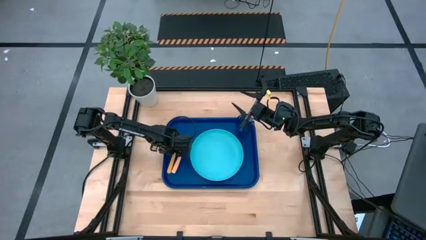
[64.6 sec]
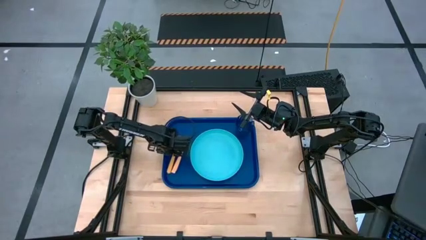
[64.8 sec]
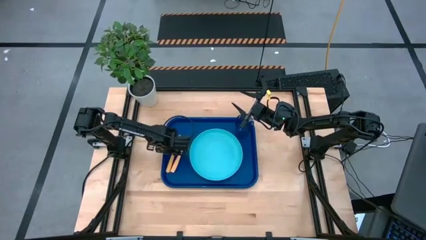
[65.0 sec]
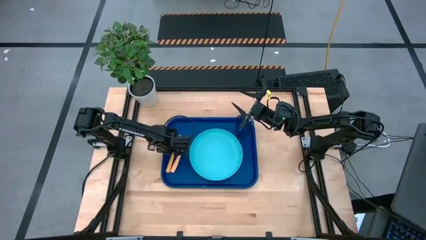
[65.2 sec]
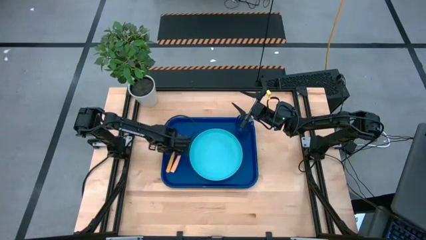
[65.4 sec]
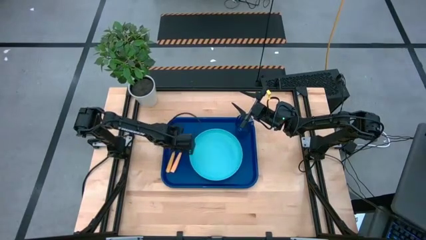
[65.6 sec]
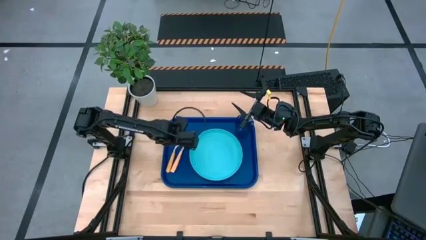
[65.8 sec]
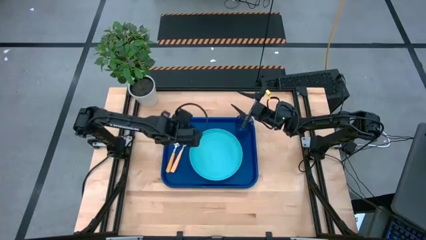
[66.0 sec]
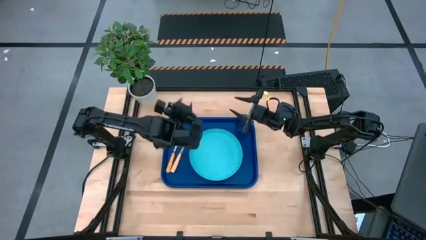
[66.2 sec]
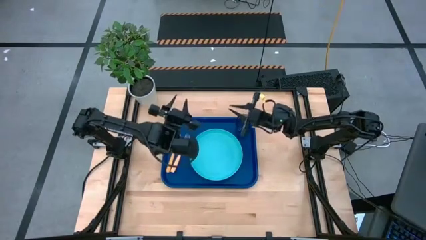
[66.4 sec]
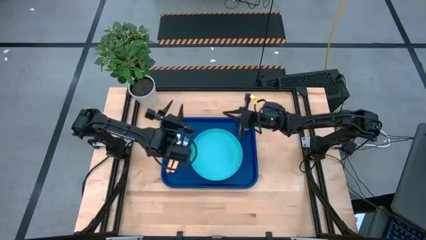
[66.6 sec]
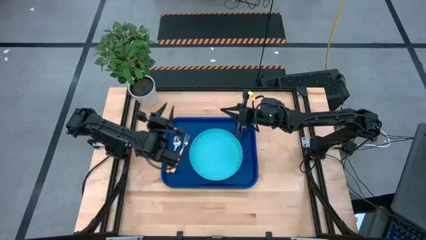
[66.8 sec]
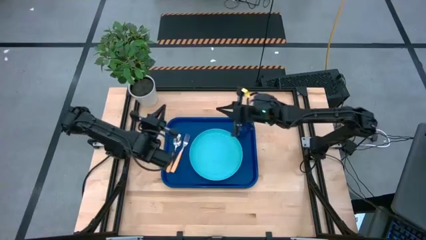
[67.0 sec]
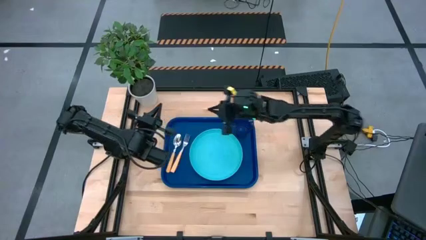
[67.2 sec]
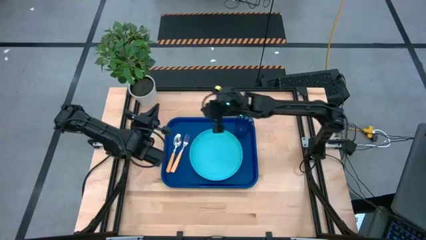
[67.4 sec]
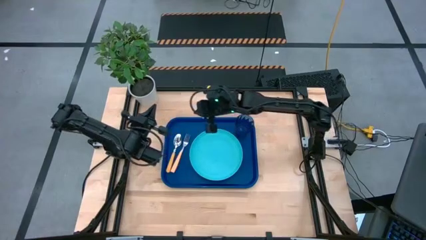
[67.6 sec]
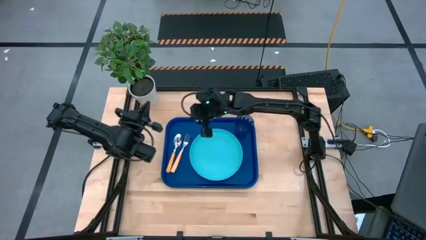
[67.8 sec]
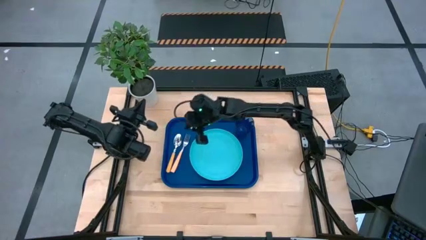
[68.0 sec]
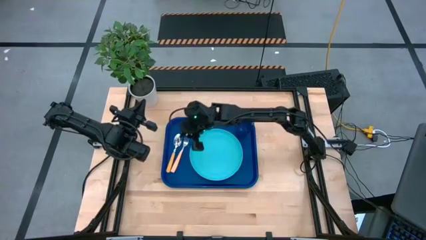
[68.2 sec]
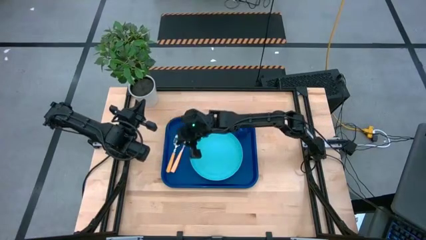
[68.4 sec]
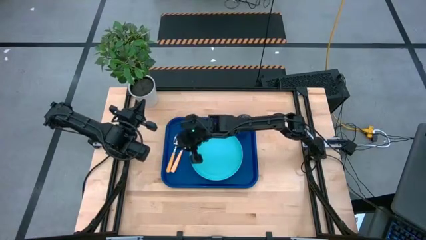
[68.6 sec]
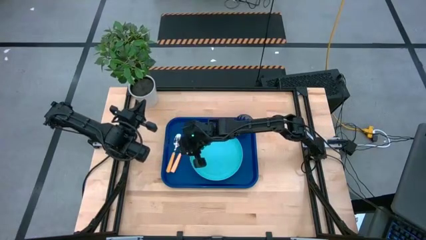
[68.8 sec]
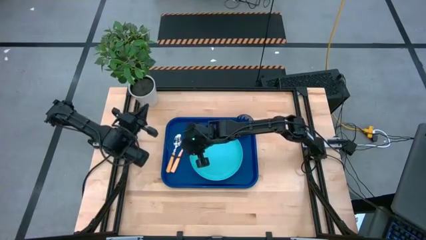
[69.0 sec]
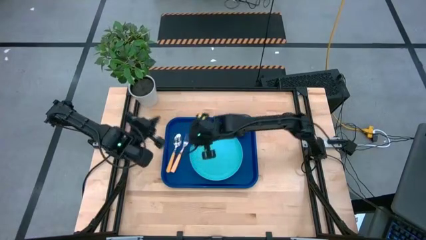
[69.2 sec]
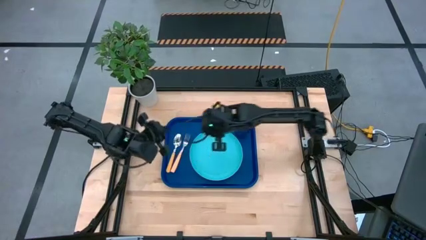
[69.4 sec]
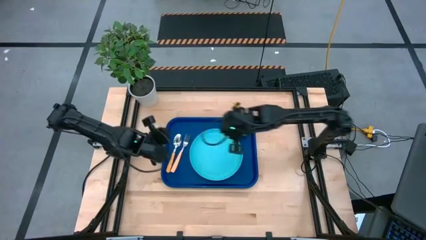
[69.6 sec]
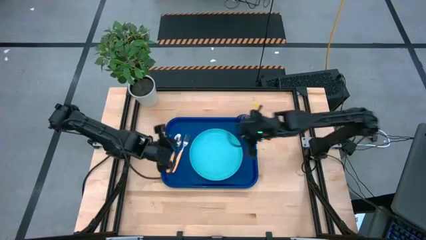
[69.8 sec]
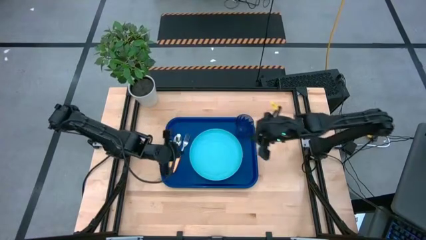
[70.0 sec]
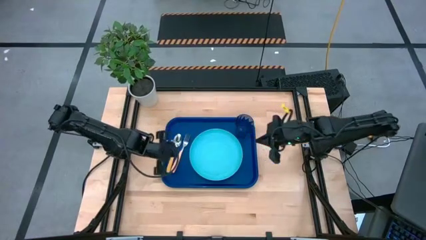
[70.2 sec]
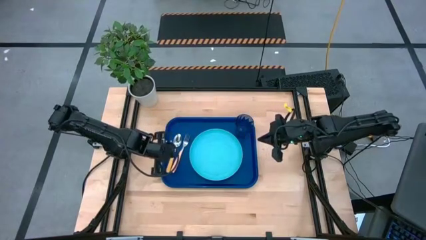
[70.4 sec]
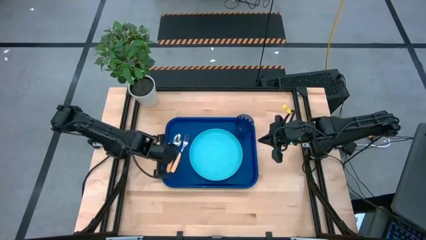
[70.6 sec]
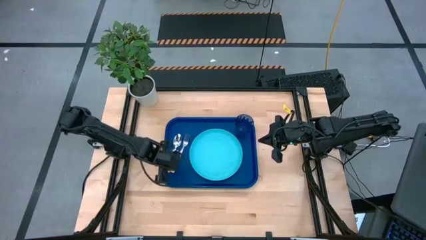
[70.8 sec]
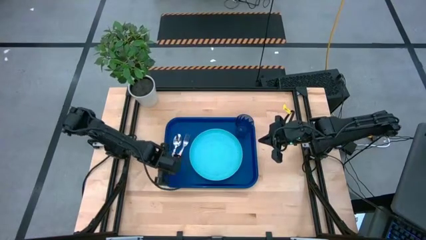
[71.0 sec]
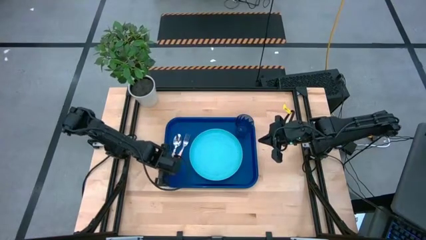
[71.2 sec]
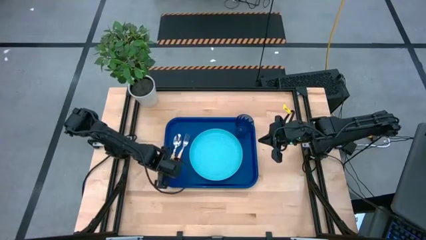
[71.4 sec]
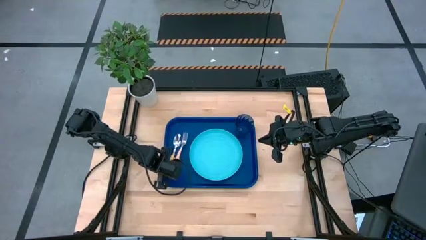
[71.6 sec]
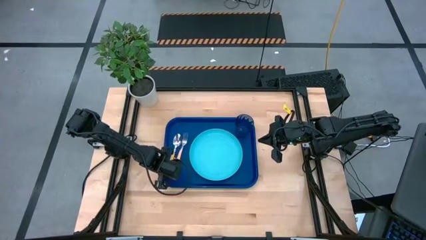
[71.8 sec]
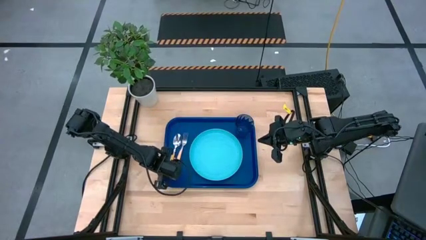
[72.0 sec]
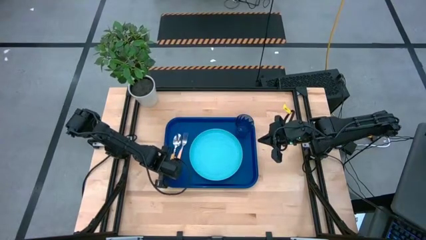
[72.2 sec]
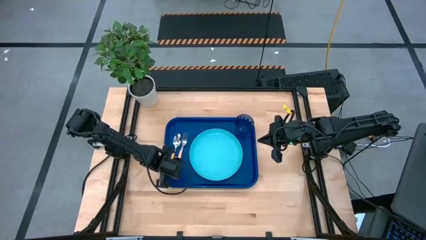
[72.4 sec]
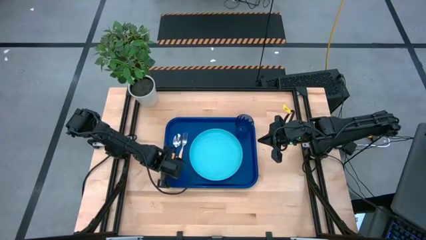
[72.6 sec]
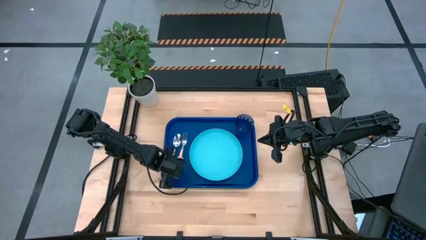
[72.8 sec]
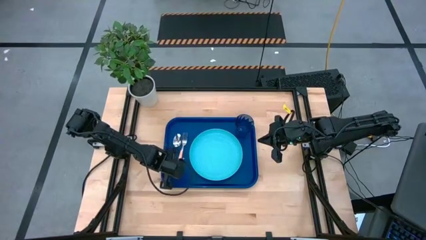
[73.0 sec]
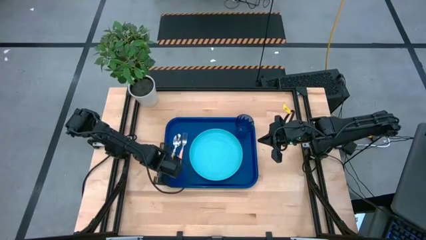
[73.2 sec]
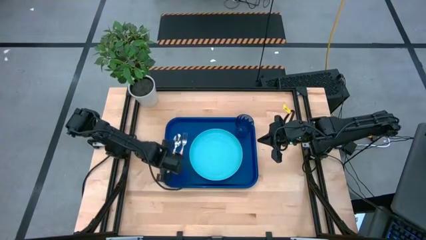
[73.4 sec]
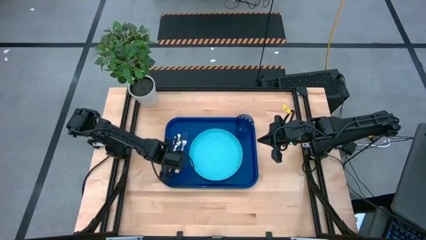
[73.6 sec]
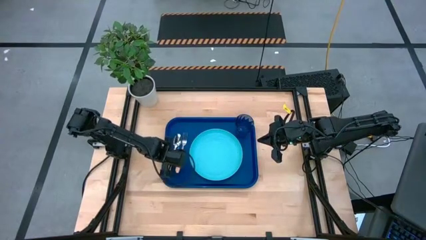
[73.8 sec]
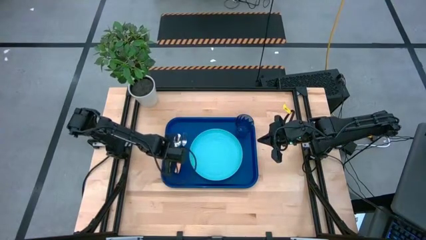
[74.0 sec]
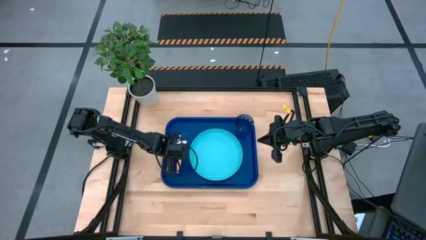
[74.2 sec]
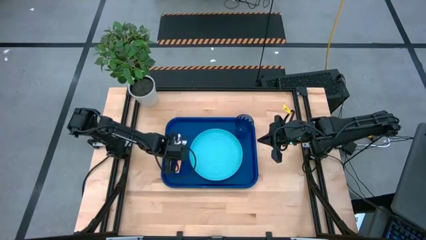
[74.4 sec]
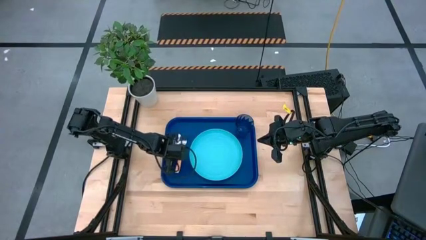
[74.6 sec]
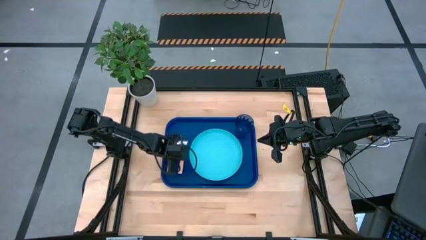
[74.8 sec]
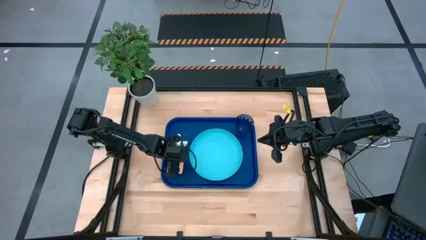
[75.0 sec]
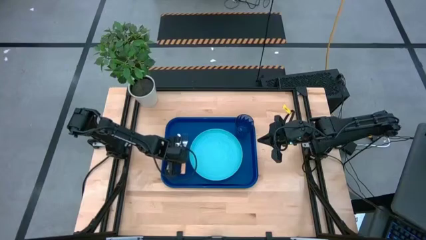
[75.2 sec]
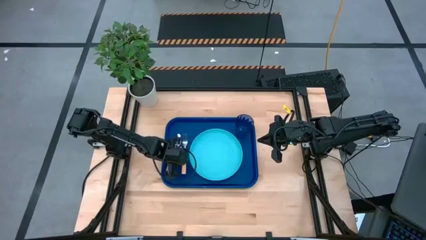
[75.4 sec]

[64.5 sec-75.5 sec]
Task: Pick and place plate/cup/fork/spoon on tray
Adjust the yellow fork on the blue serving tray

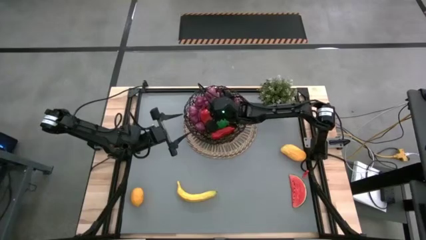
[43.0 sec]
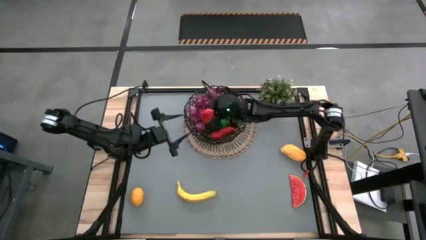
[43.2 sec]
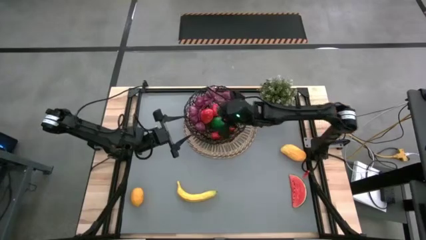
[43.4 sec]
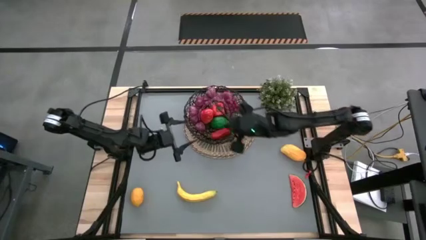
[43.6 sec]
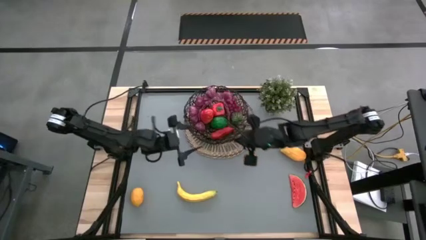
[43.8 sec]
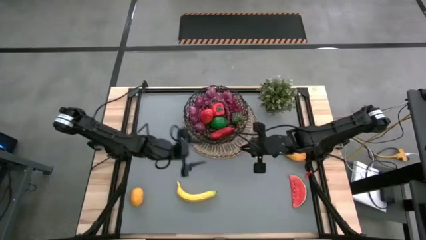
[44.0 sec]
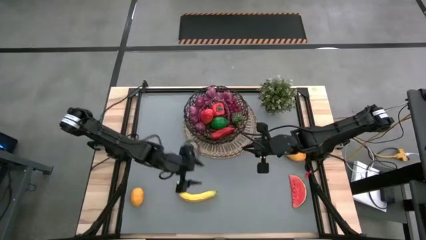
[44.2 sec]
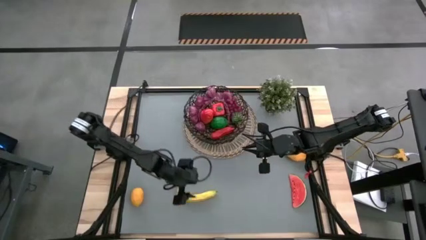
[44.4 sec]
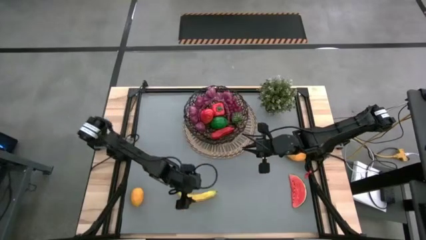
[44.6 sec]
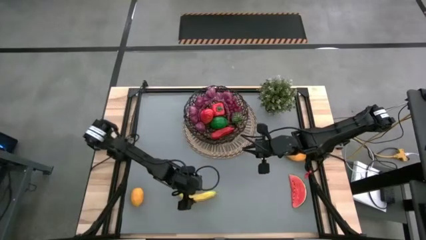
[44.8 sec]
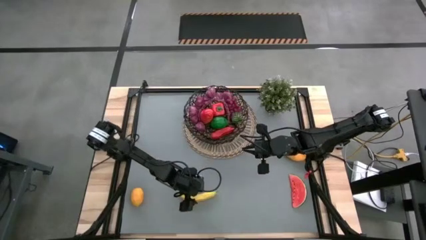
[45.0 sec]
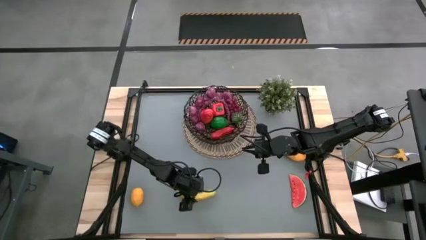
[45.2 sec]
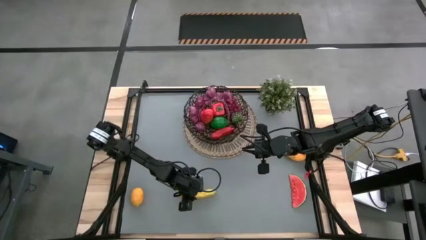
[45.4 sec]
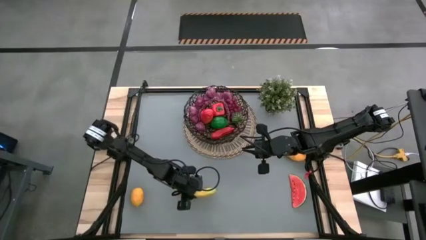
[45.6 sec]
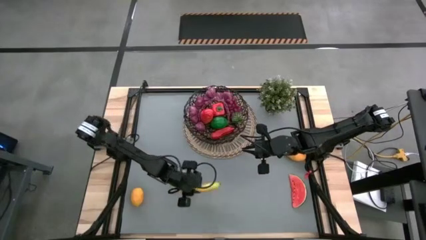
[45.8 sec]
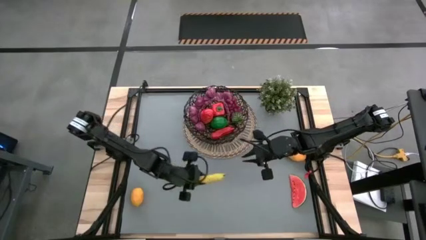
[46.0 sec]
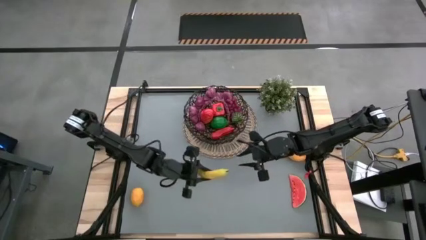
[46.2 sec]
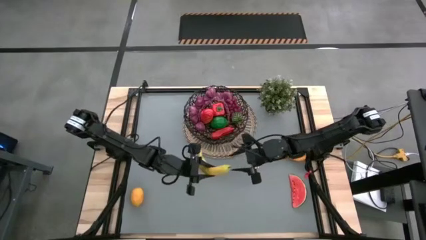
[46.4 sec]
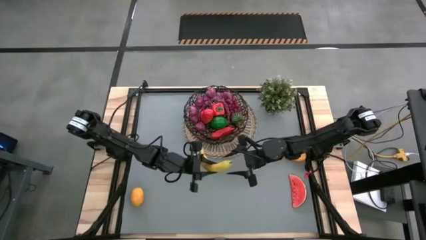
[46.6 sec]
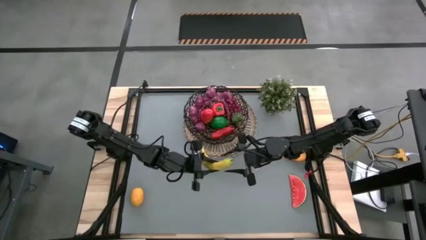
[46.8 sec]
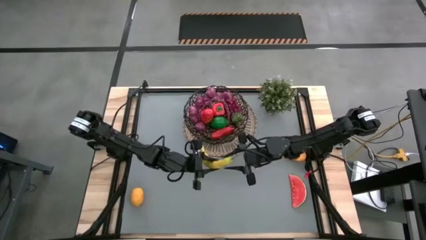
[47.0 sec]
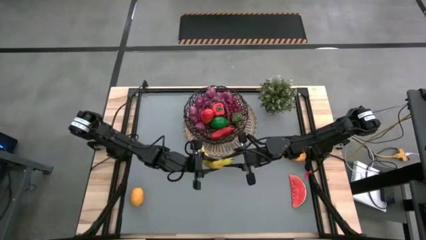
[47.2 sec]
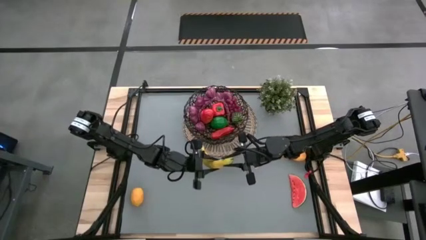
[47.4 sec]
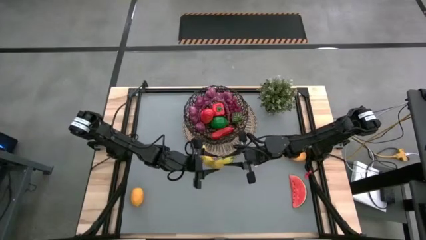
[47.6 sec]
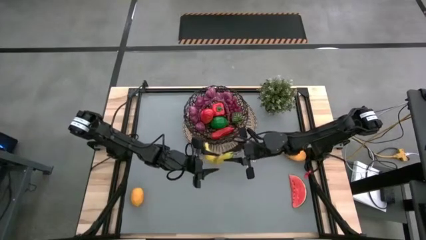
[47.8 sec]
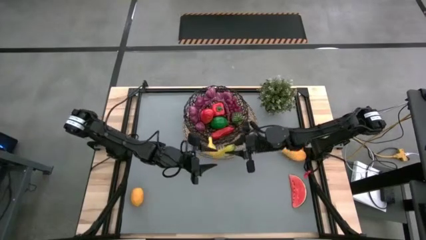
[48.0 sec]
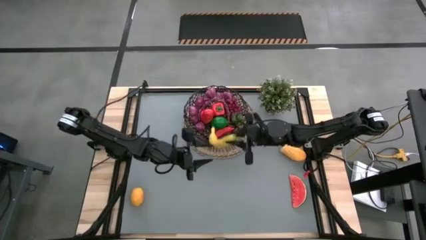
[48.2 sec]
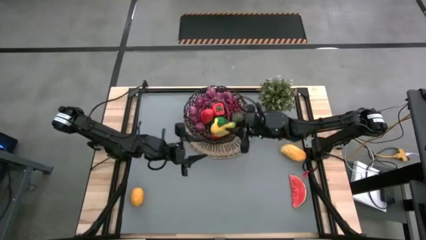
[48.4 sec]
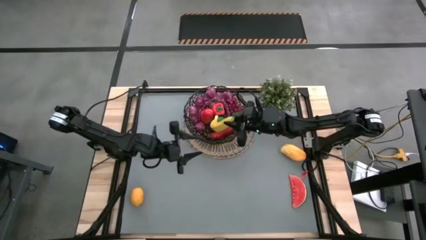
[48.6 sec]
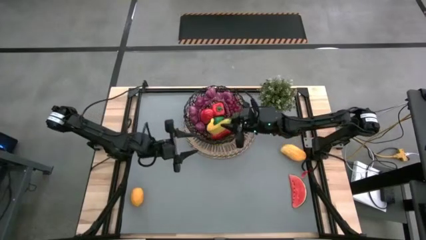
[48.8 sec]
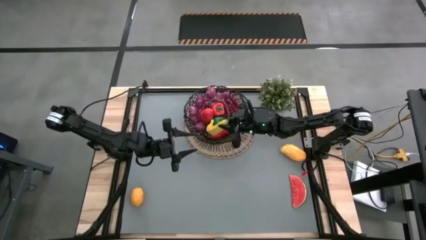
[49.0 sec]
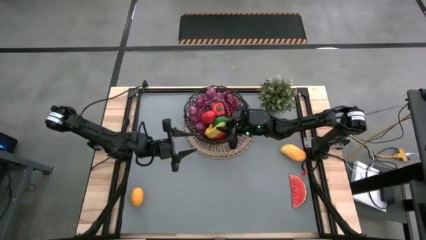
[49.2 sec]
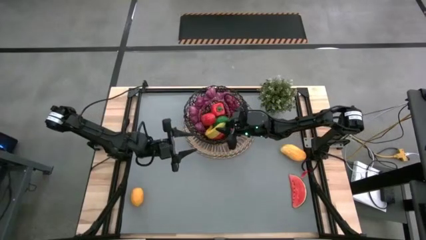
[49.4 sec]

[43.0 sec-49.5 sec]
Task: Build produce basket
Put the yellow banana into the basket
